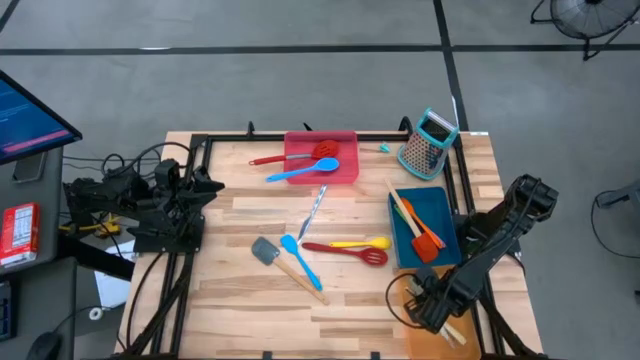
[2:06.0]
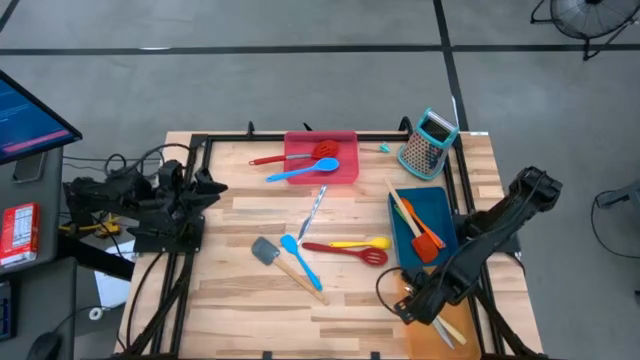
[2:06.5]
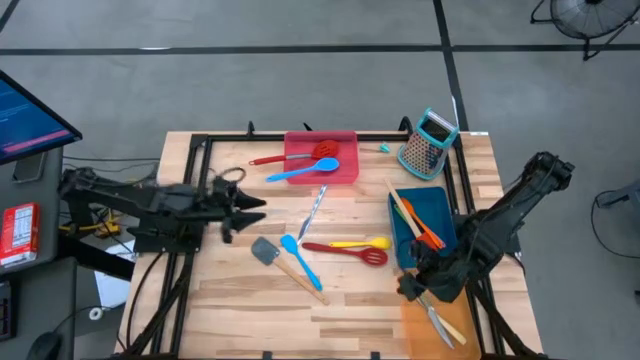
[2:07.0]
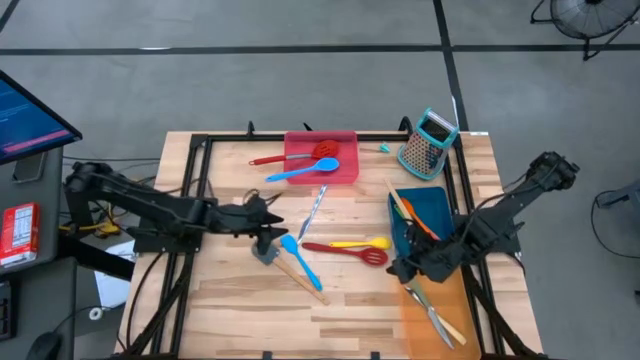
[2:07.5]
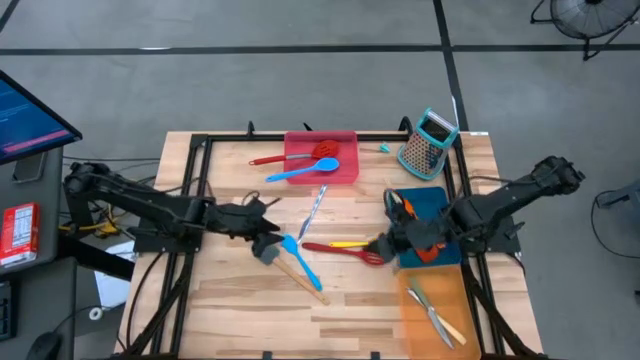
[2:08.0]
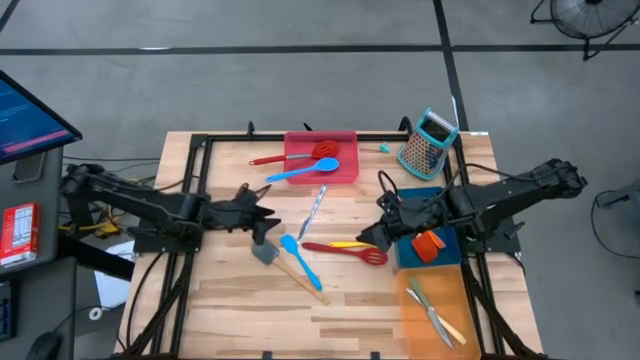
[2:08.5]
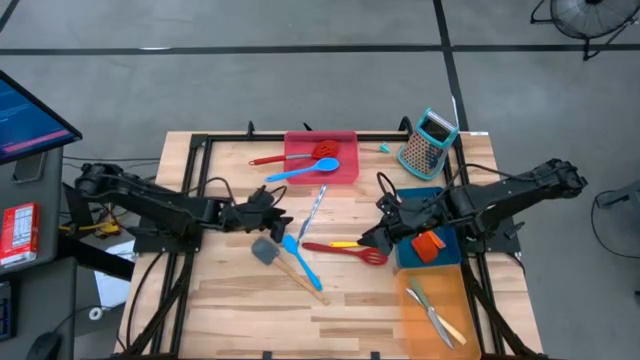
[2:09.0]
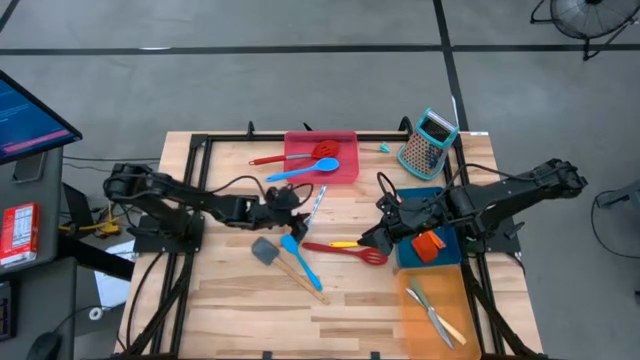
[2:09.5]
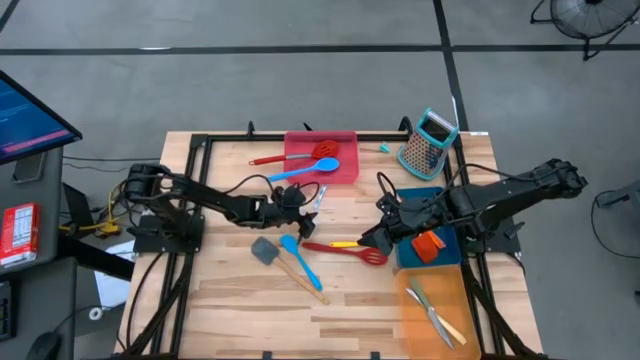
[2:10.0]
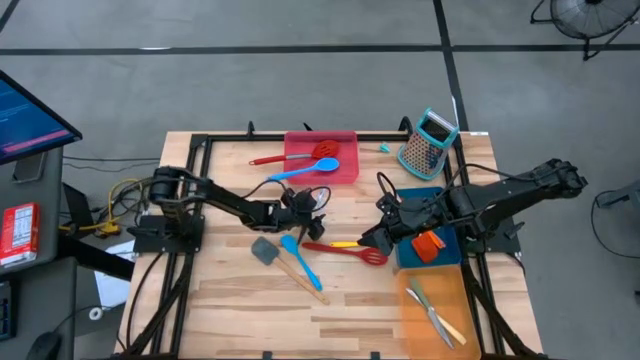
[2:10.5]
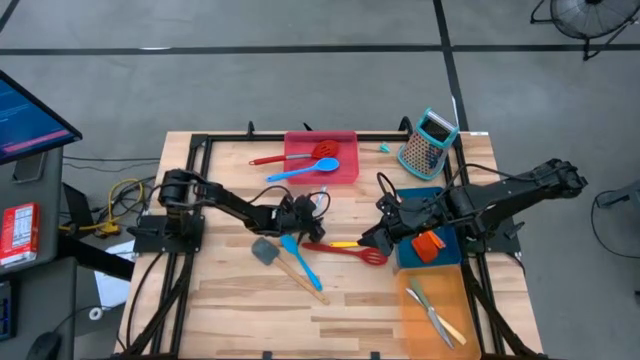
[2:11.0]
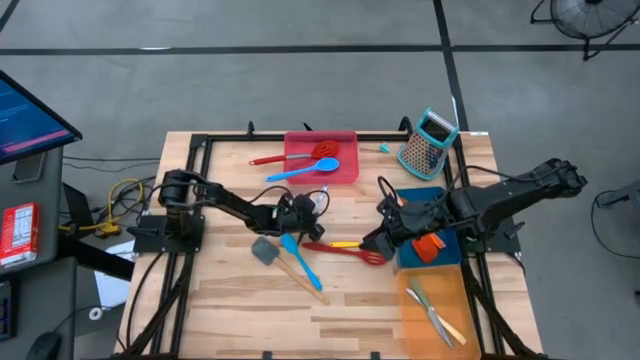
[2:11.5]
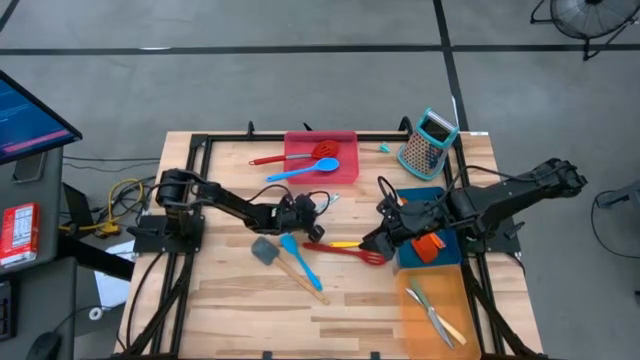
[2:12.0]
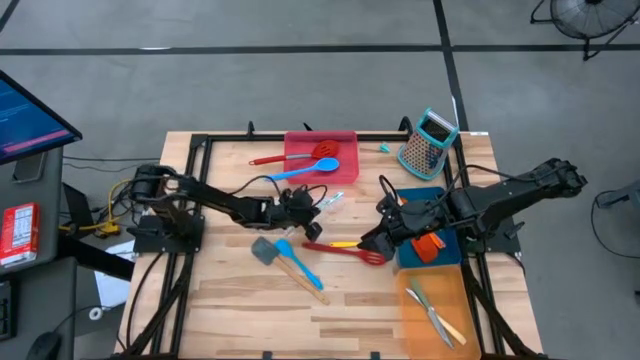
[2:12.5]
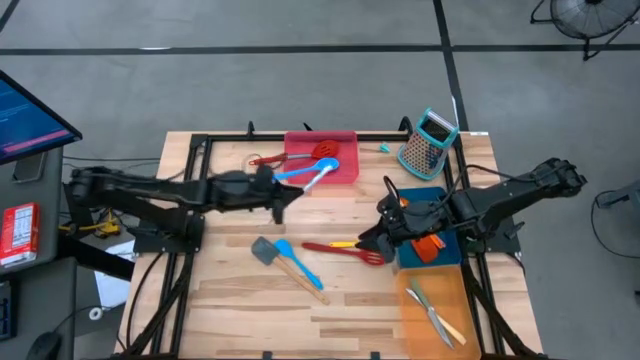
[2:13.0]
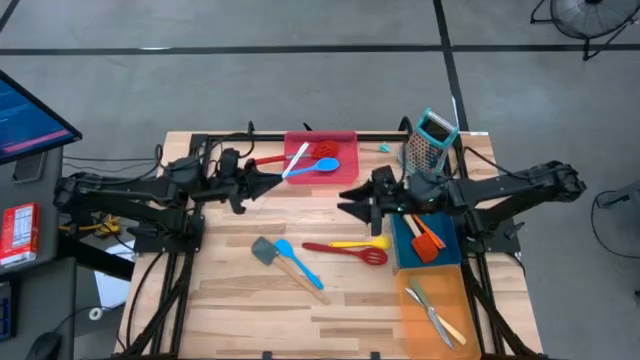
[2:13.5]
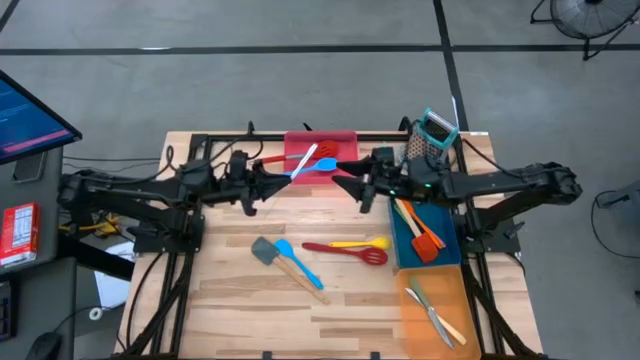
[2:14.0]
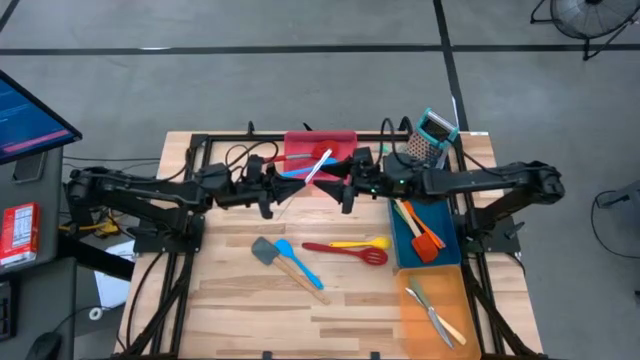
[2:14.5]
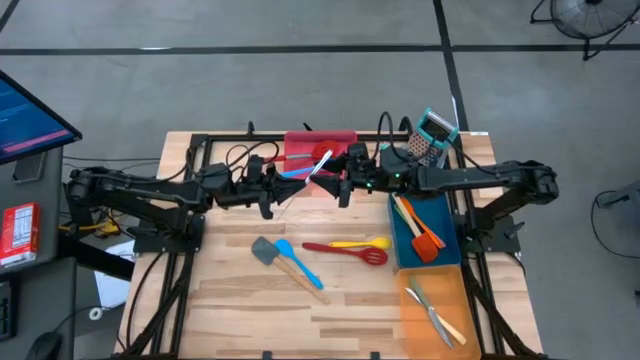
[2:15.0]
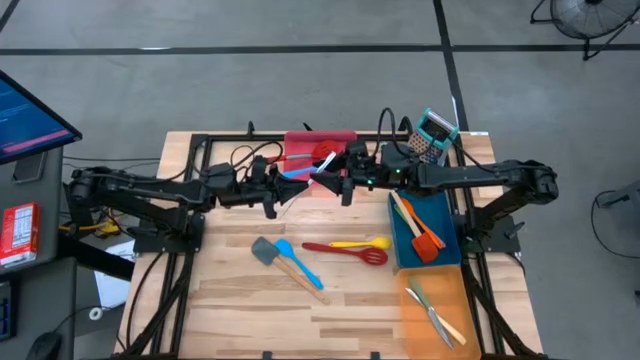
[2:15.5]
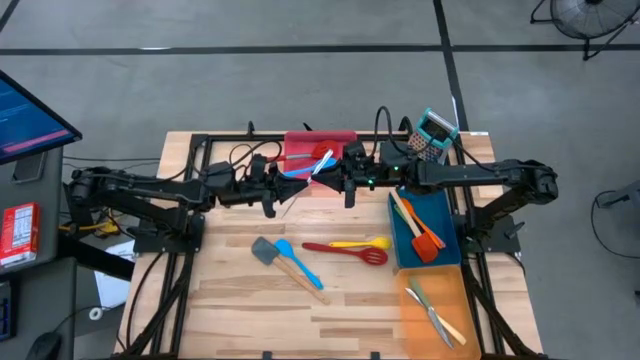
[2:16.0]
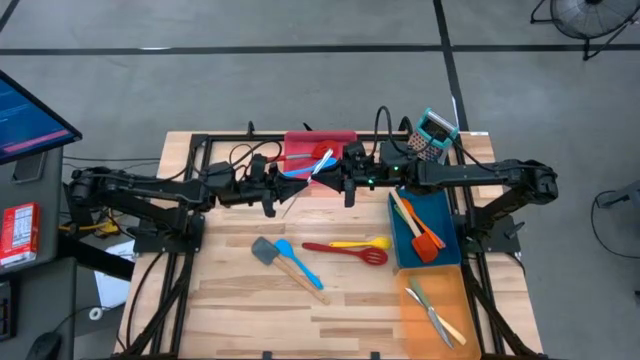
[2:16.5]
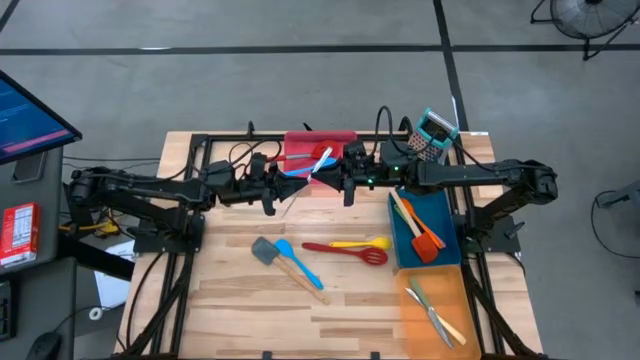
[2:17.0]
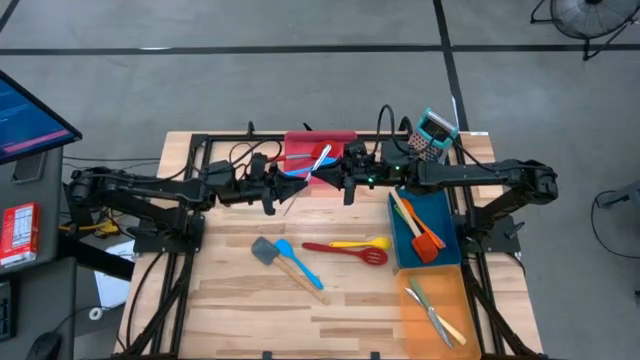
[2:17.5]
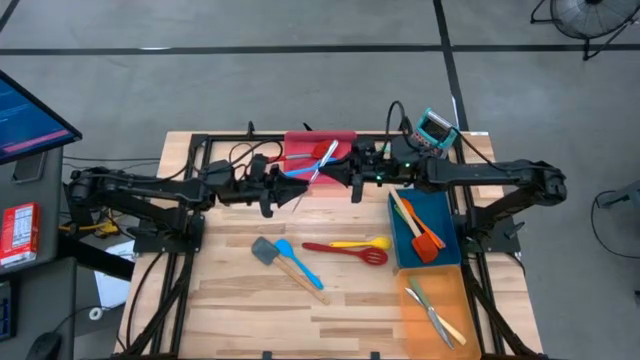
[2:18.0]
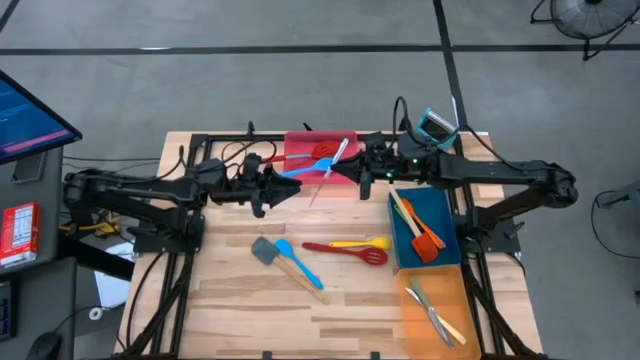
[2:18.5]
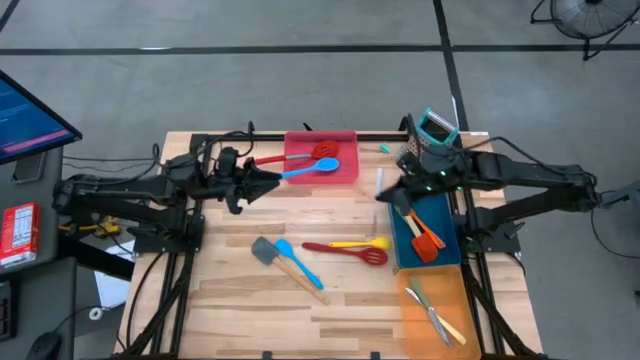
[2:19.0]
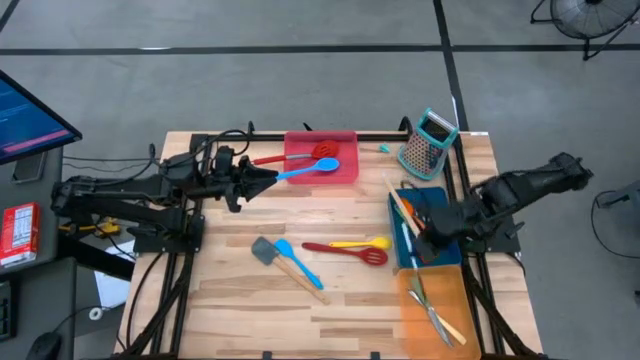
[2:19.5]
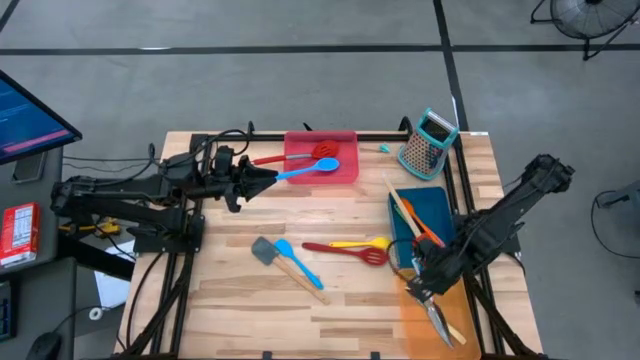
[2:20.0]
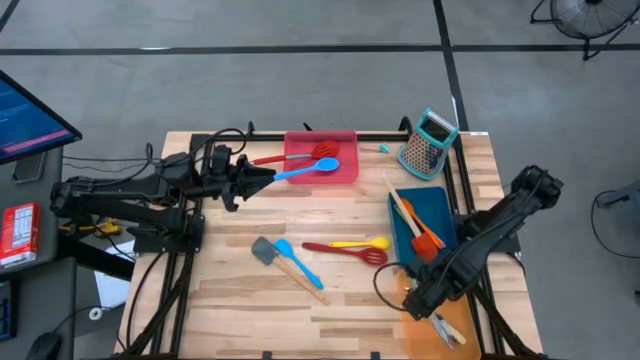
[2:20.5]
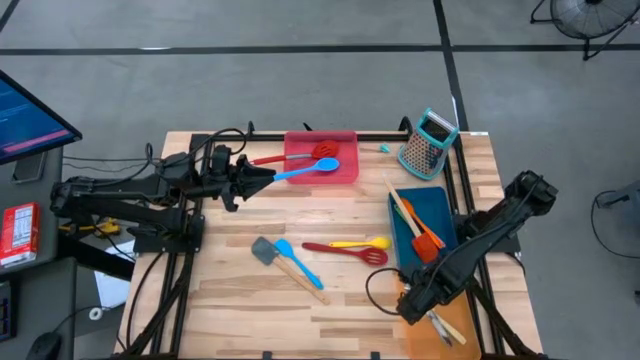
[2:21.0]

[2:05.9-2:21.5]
Task: Pick & Place Kitchen Items
Put the blue kitchen knife into the orange bin

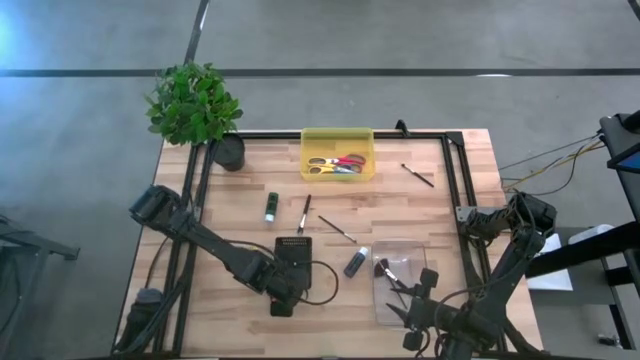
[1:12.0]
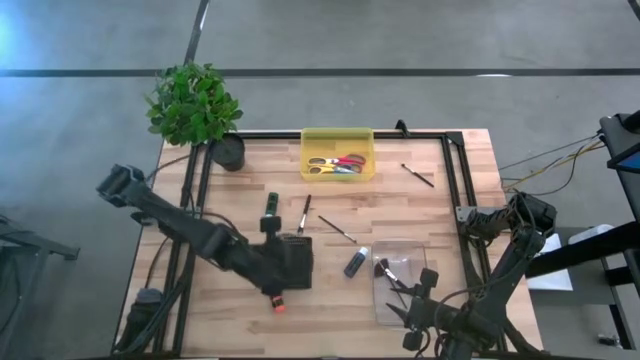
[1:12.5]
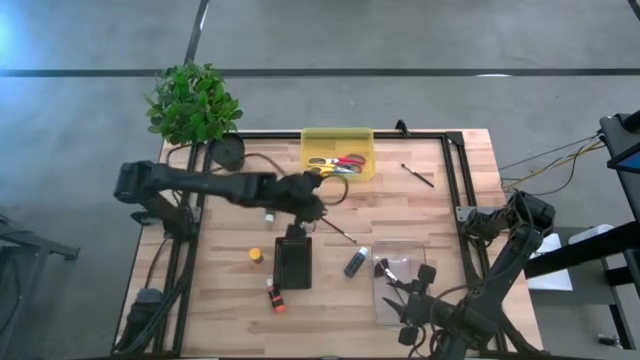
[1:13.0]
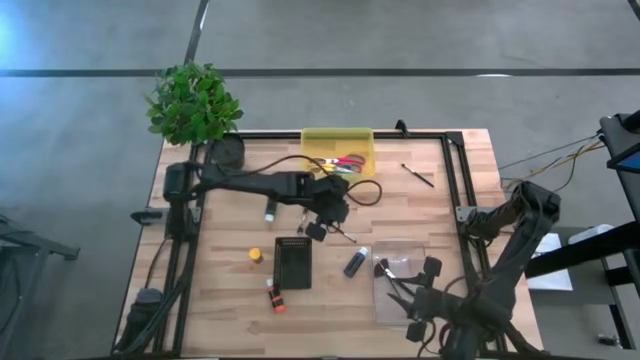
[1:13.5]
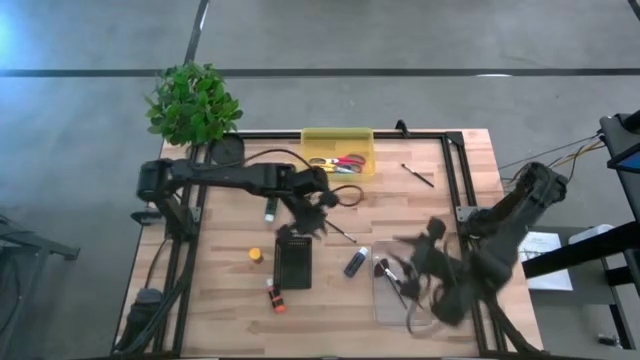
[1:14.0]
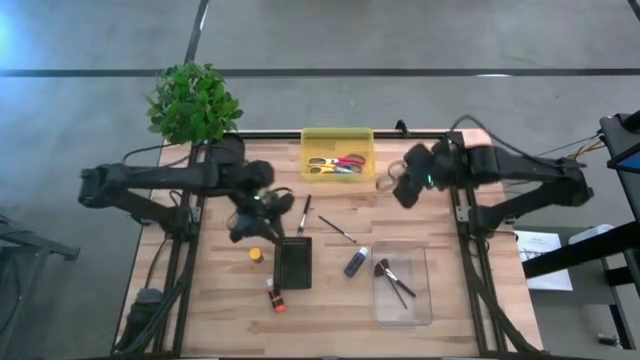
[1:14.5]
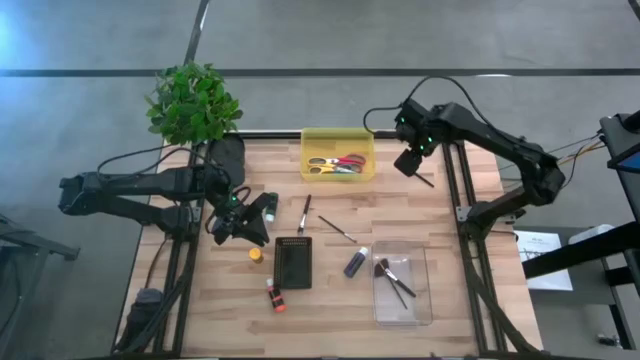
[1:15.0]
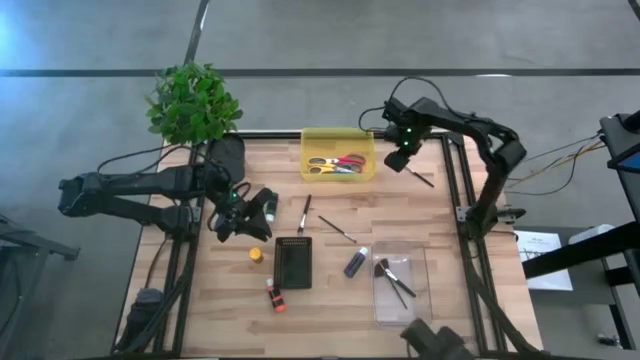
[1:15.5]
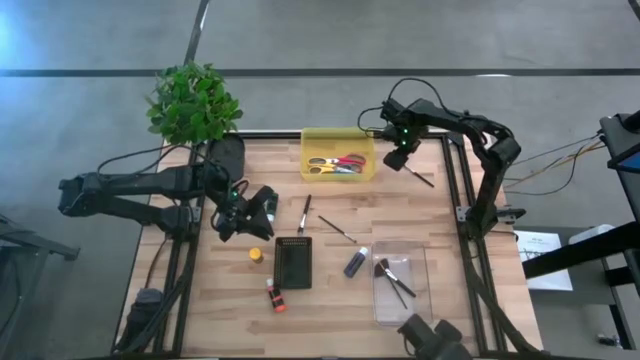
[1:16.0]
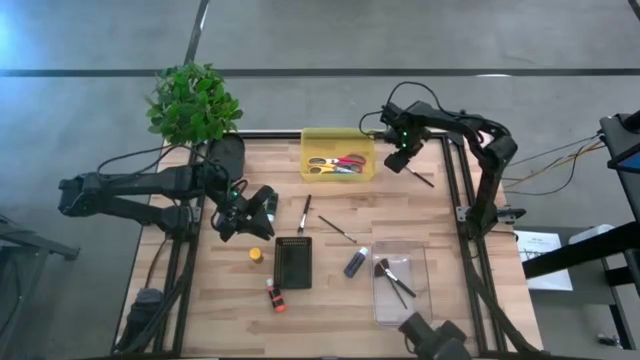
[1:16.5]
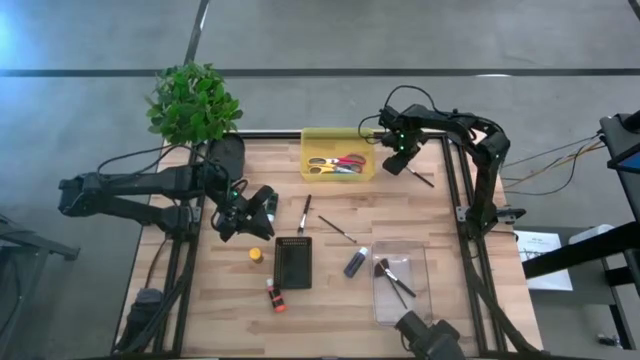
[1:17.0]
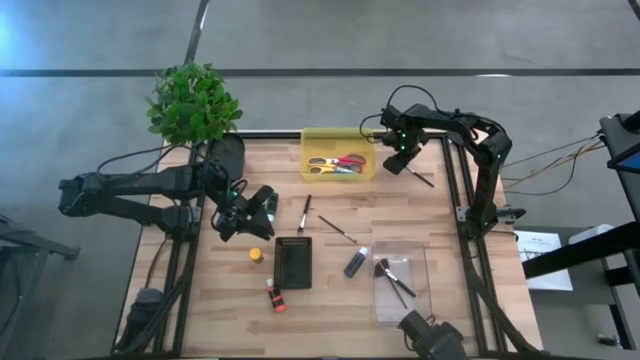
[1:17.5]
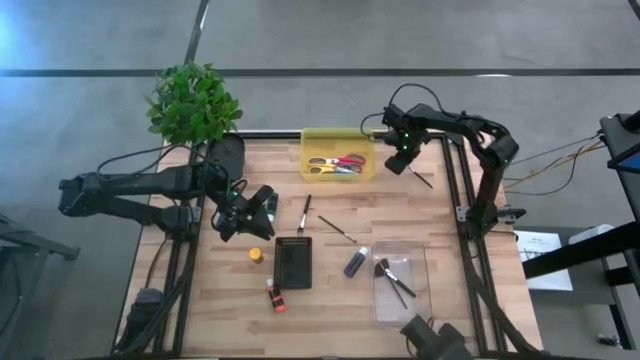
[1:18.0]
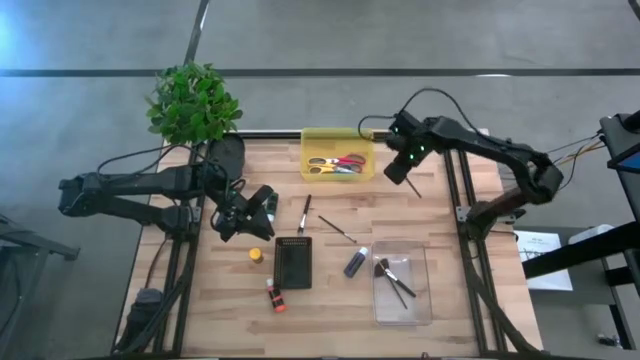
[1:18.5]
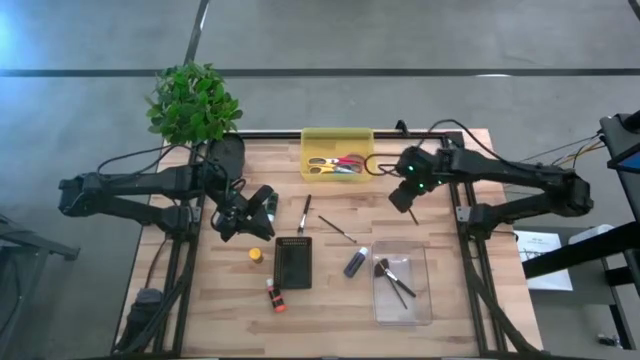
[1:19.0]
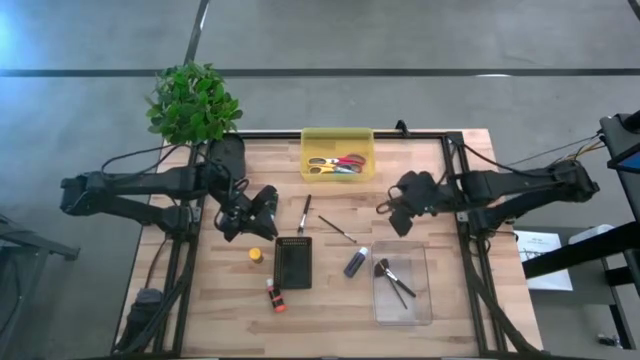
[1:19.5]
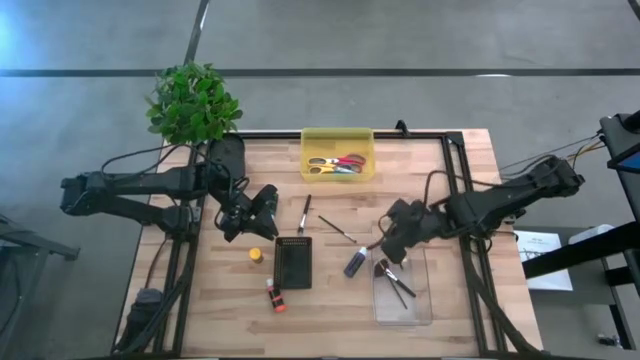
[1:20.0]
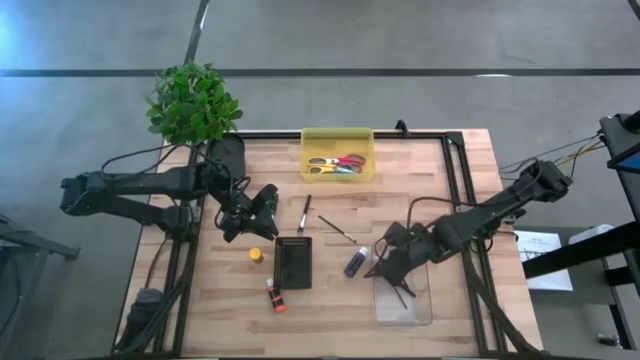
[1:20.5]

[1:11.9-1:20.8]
Task: Pick & Place Paint Supplies
Put the top right eyeliner brush into the transparent bin
